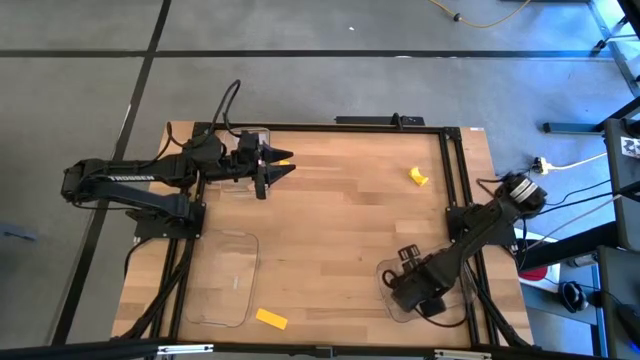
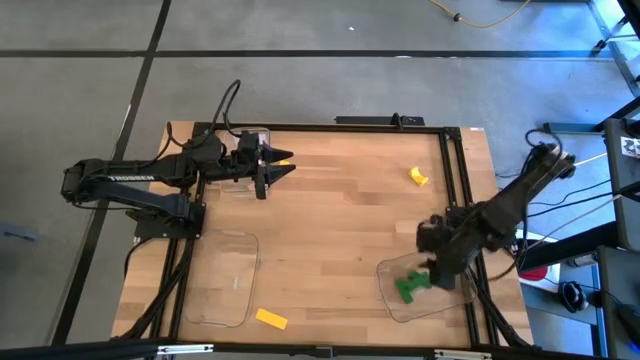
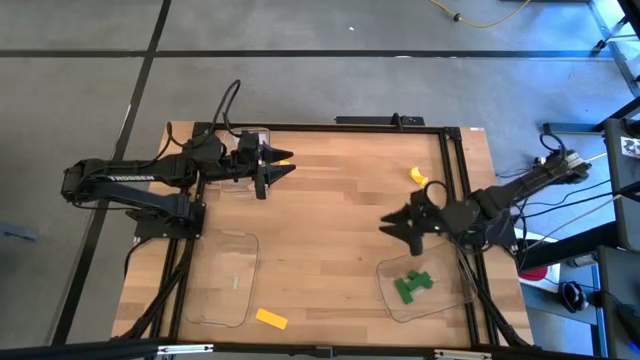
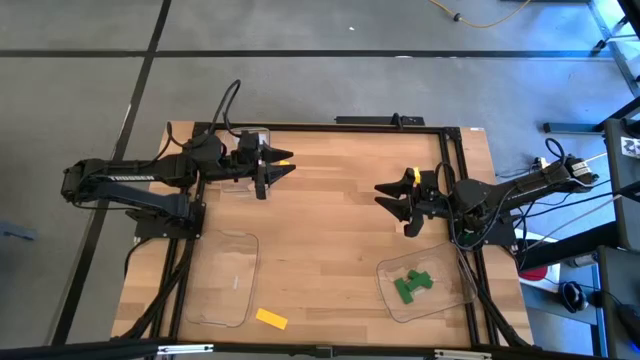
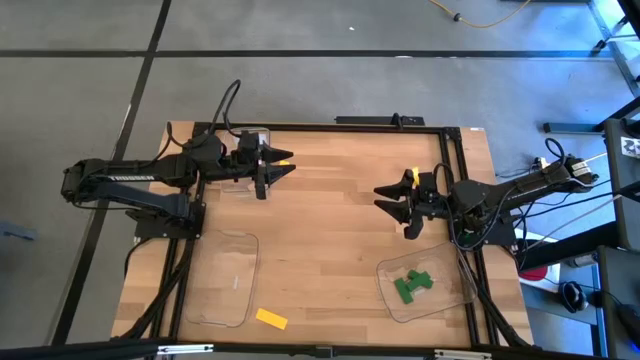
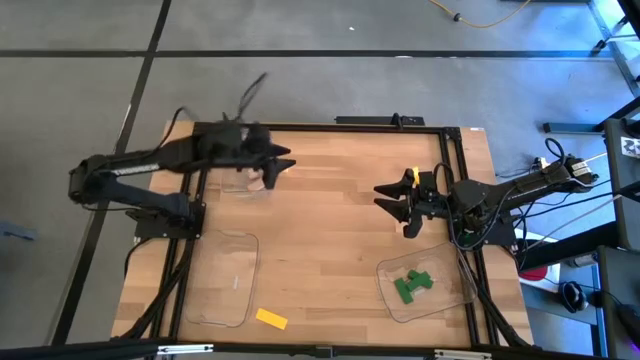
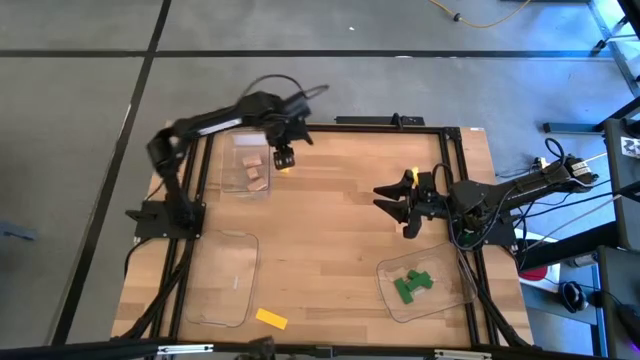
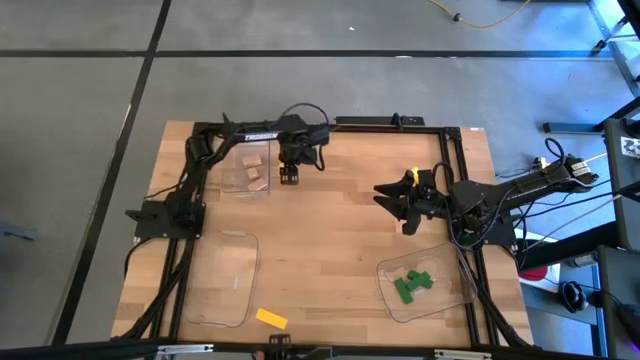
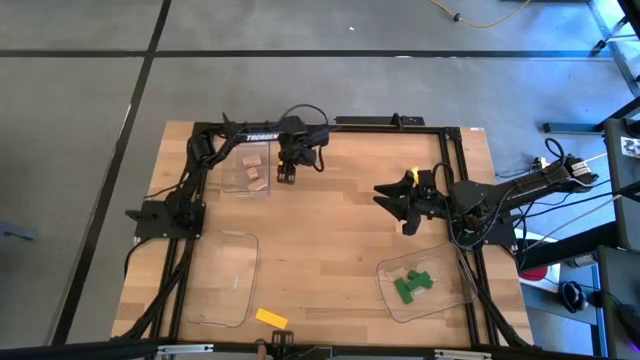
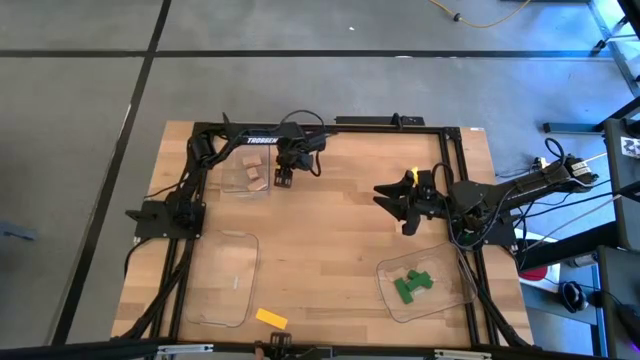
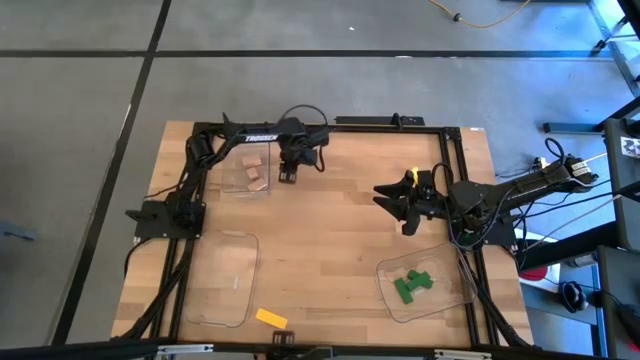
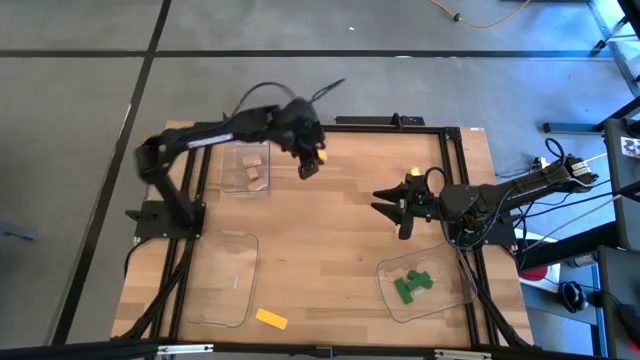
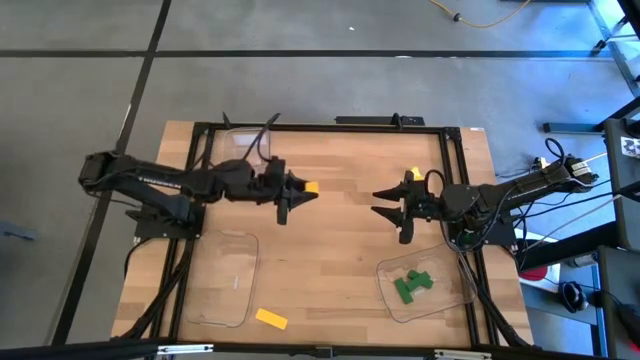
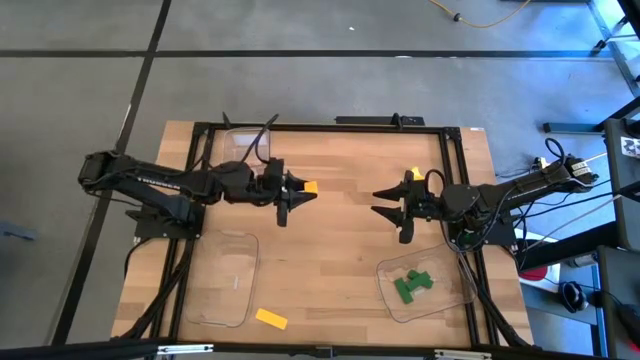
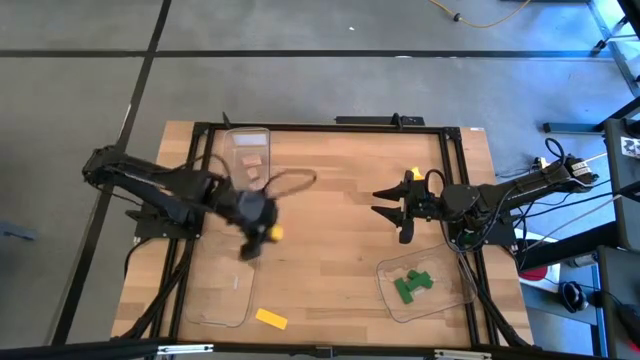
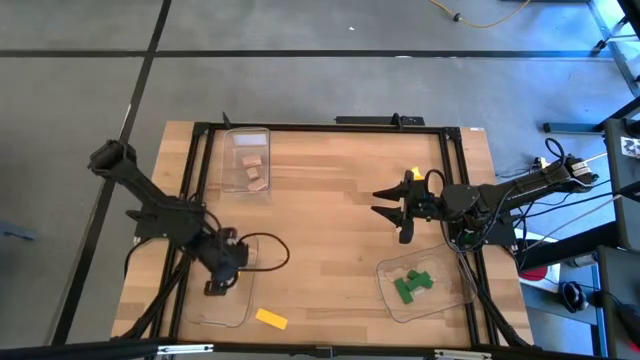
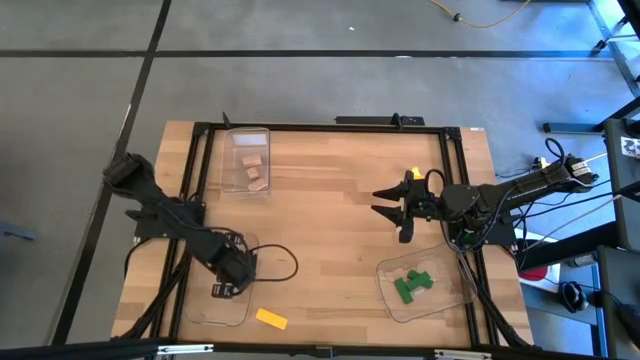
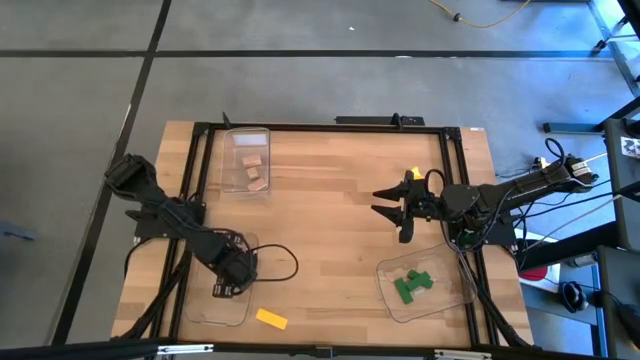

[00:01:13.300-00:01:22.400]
Task: Sort & place blocks by color
Put the left yellow block into the bottom left transparent bin

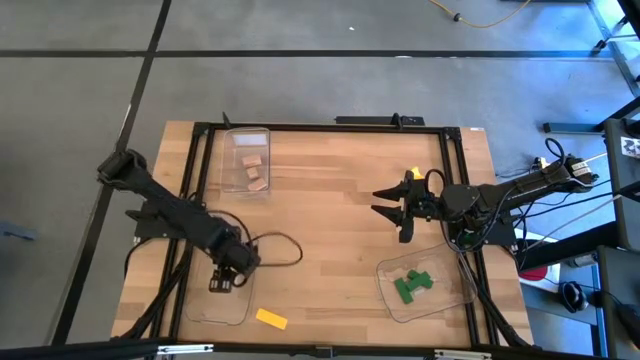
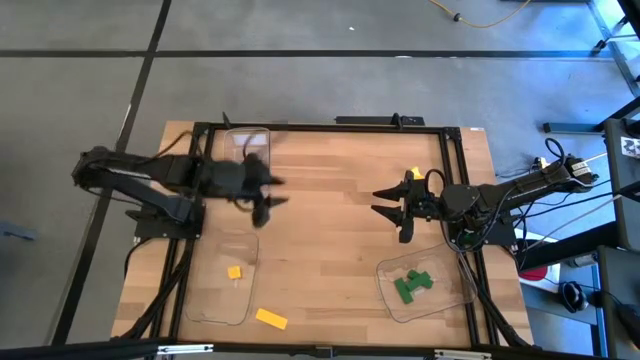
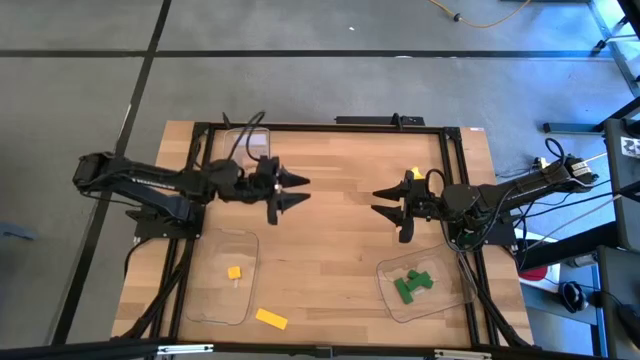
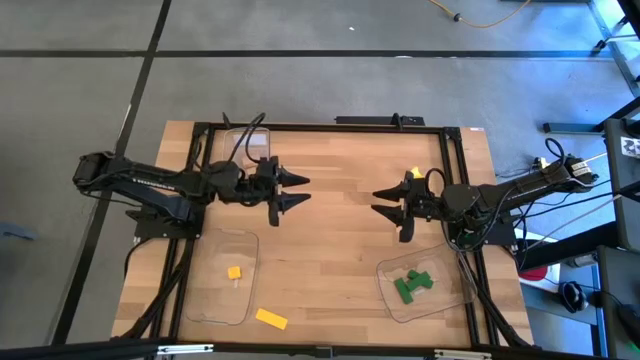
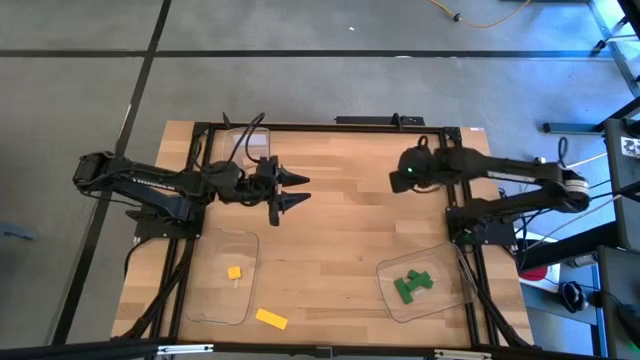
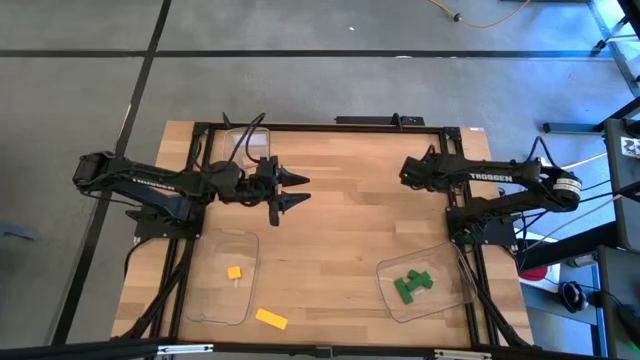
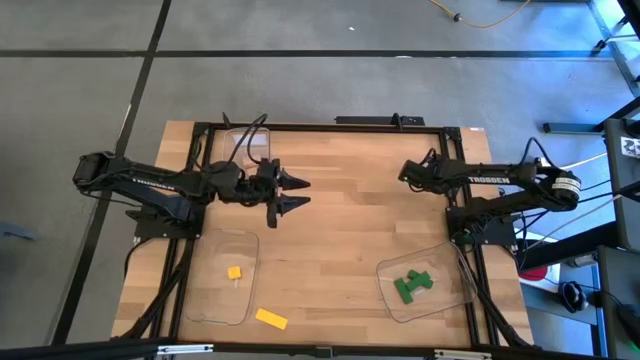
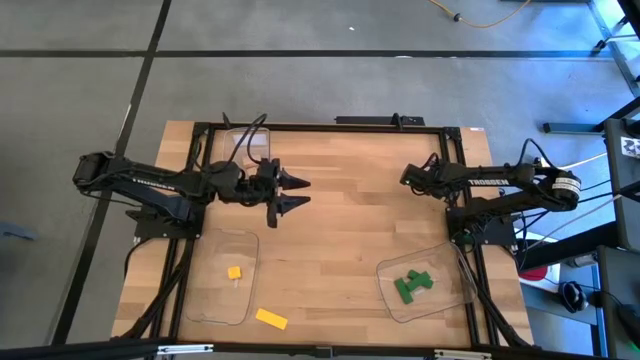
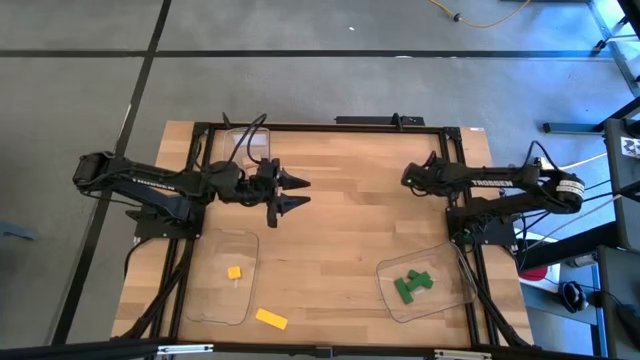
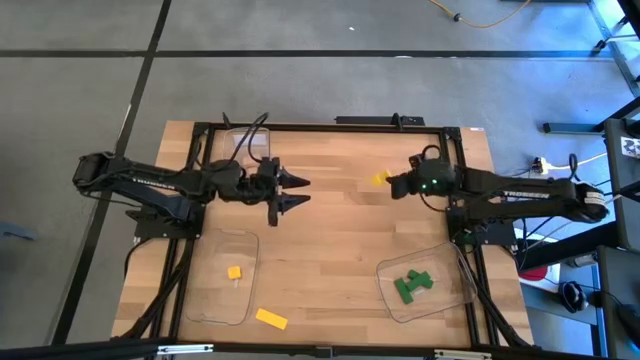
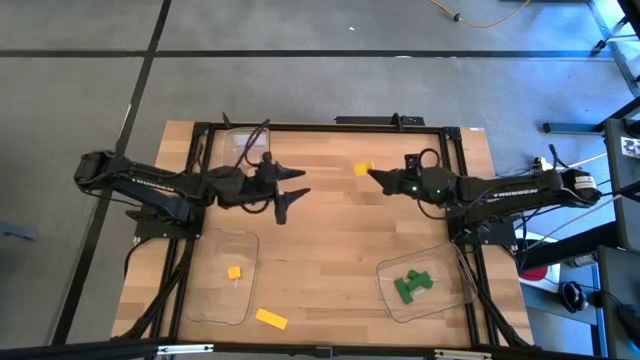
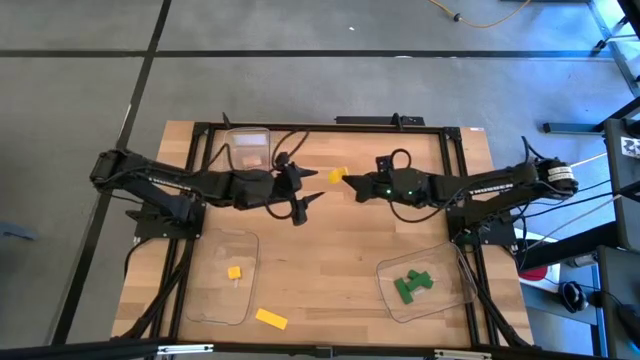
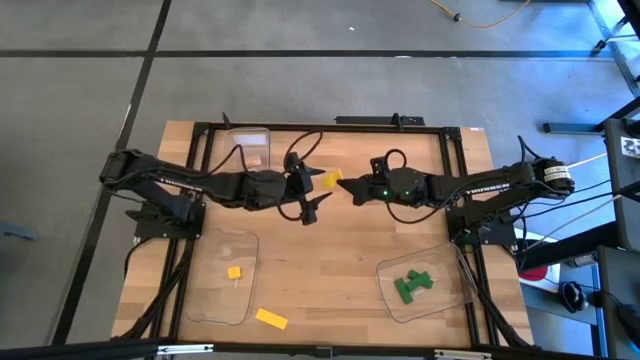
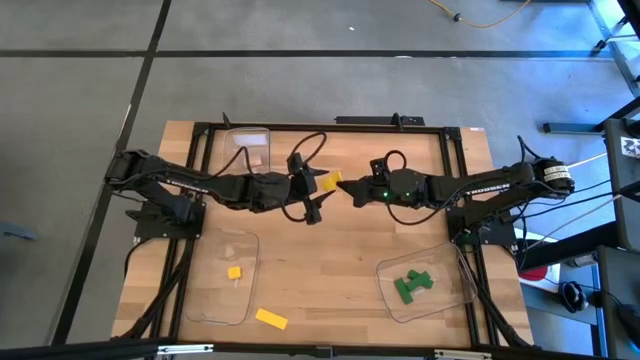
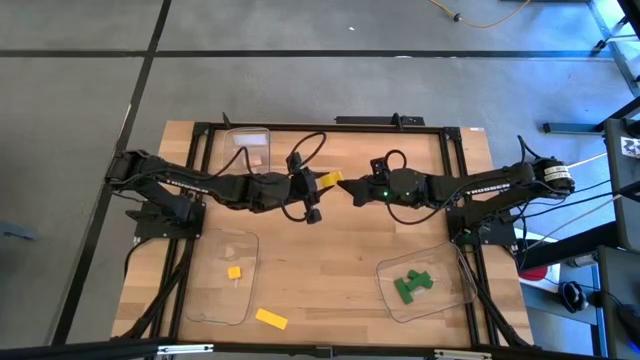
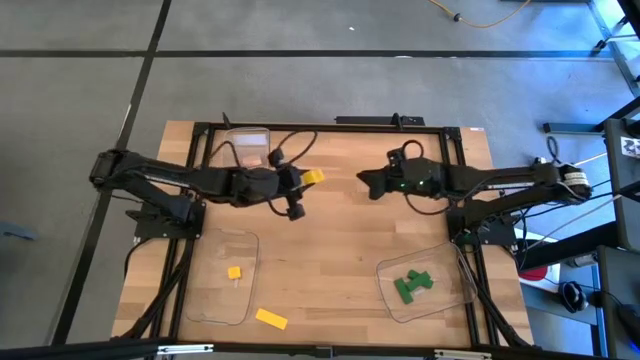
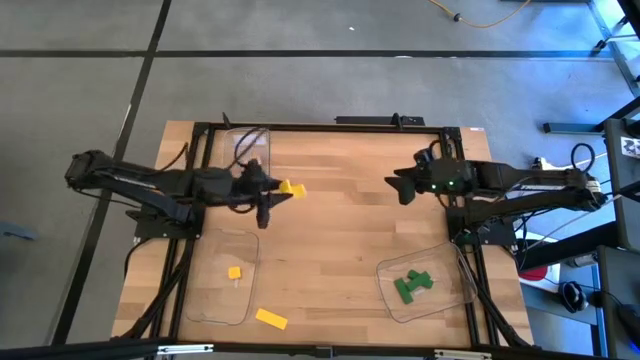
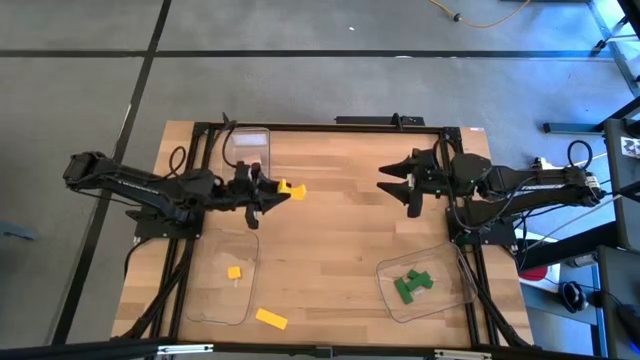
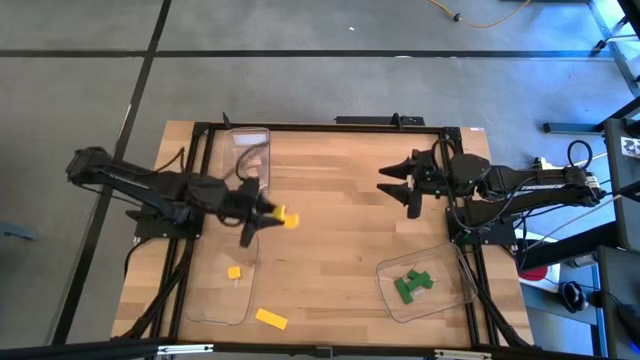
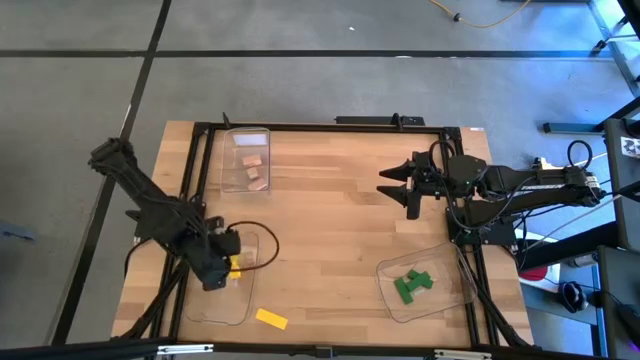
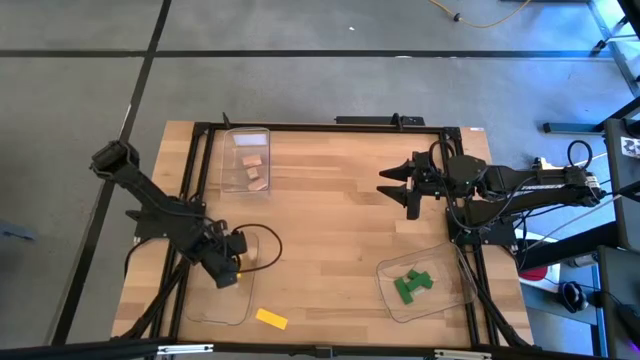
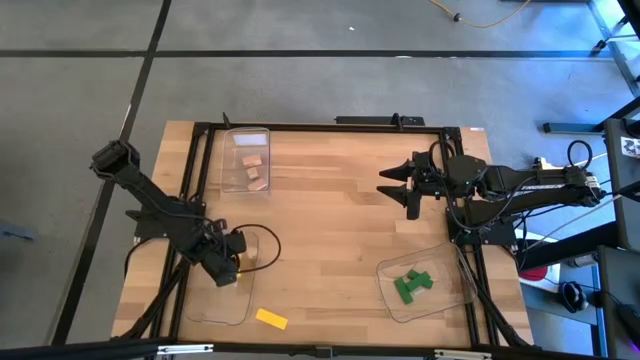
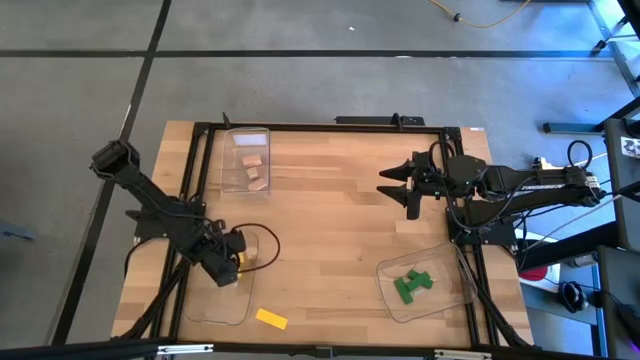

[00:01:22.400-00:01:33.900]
Put the right yellow block into the bottom left transparent bin

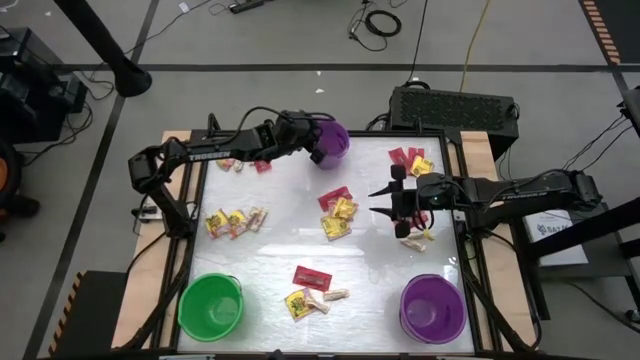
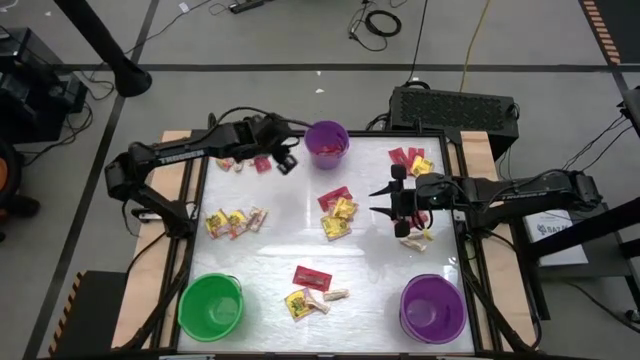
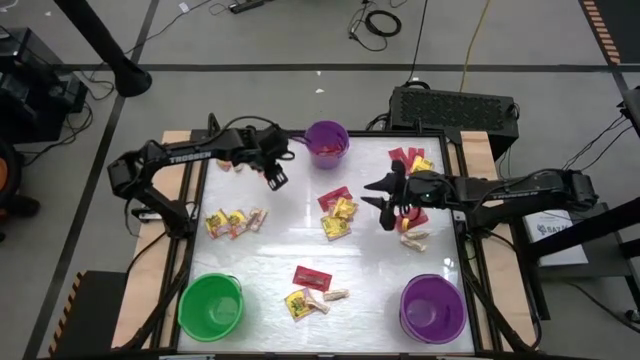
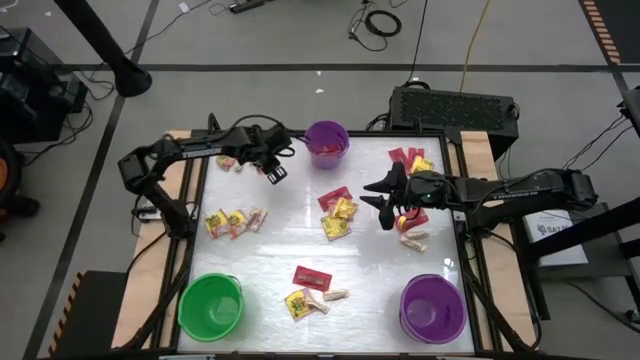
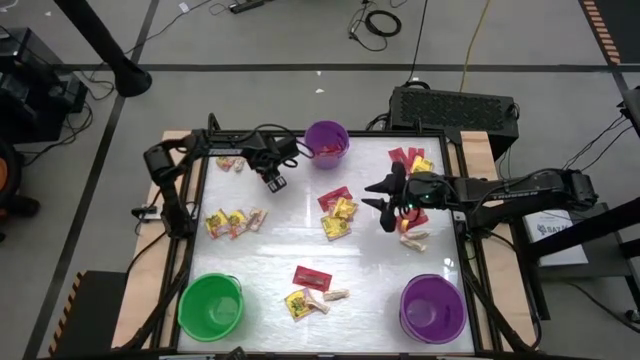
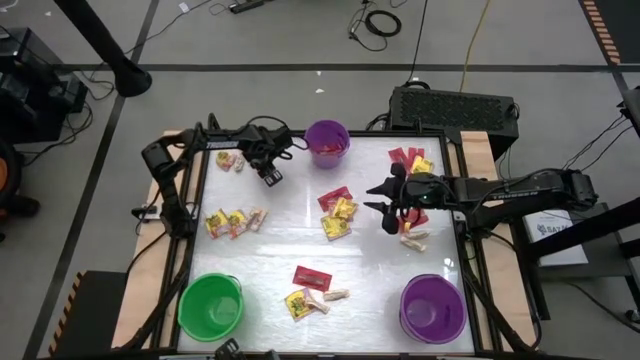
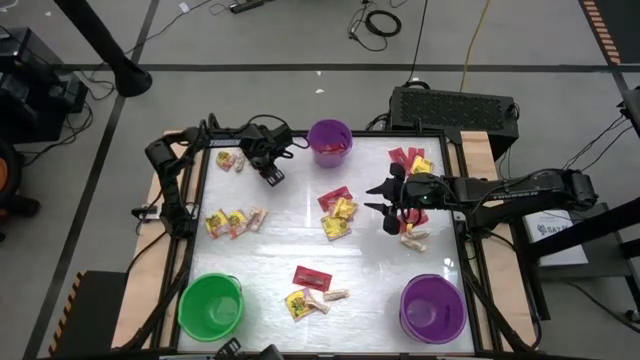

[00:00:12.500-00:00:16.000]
Task: Sort candy by brand, put in halloween buckets
Put the red candy into the top purple bucket
